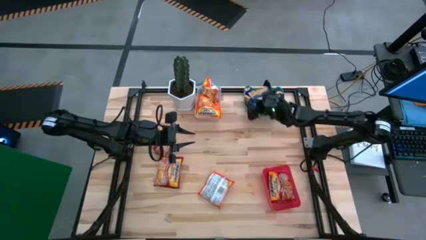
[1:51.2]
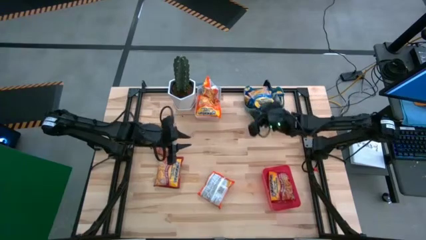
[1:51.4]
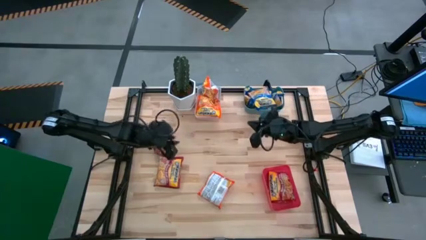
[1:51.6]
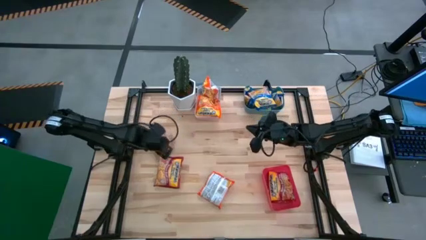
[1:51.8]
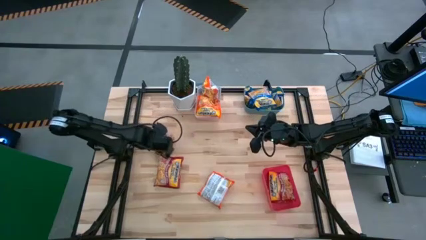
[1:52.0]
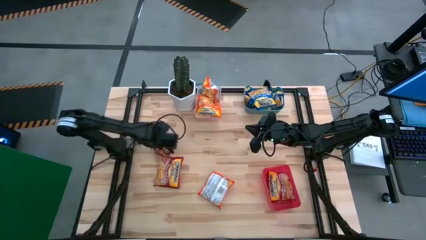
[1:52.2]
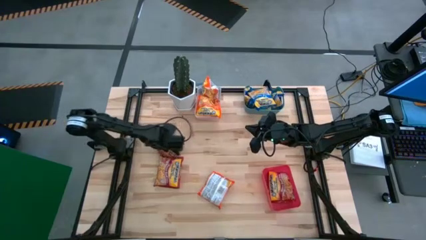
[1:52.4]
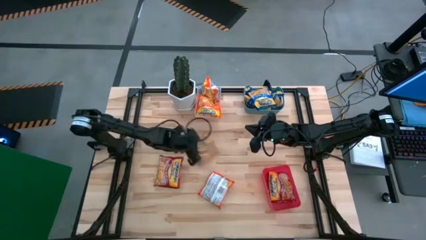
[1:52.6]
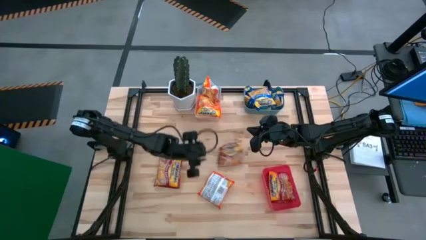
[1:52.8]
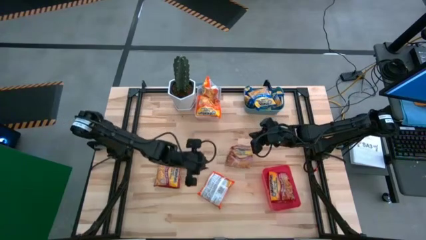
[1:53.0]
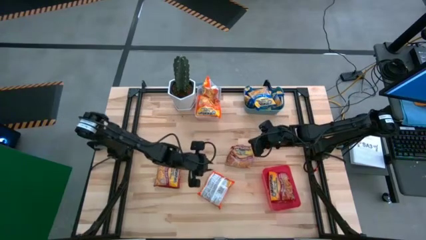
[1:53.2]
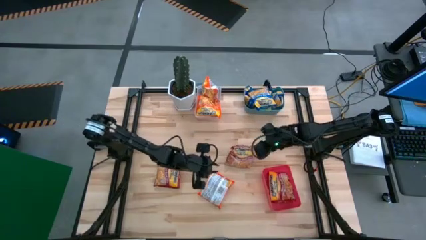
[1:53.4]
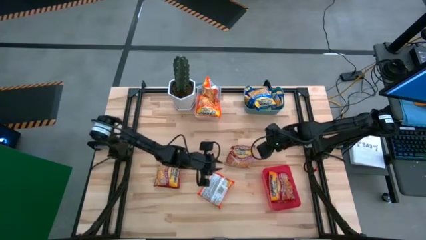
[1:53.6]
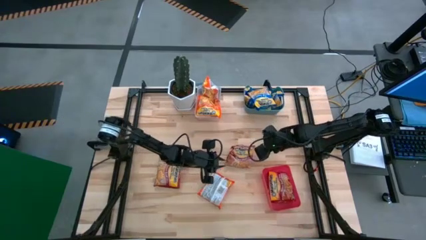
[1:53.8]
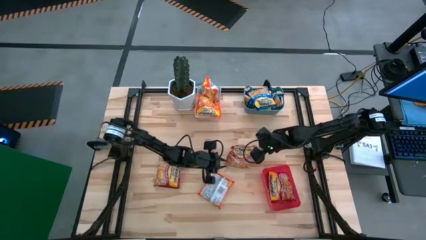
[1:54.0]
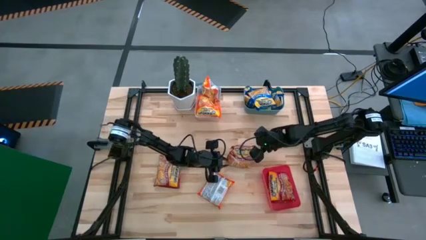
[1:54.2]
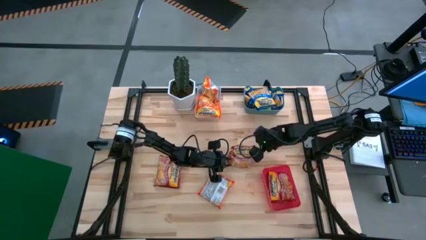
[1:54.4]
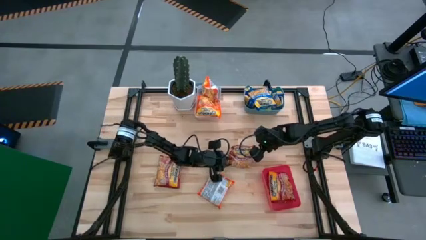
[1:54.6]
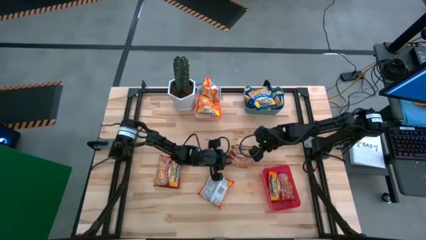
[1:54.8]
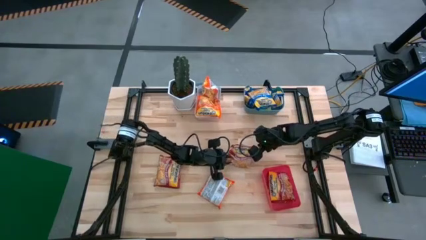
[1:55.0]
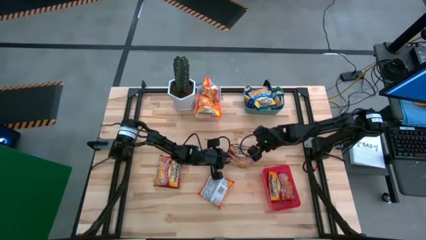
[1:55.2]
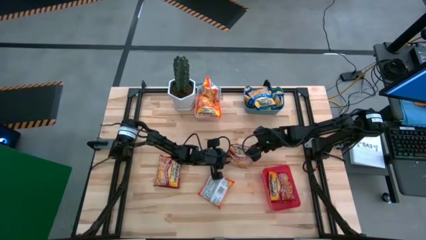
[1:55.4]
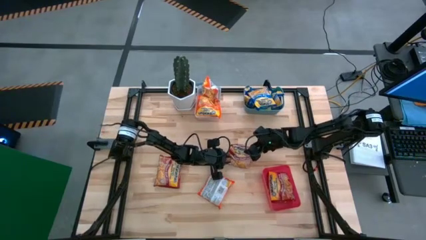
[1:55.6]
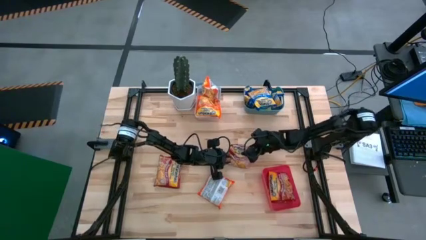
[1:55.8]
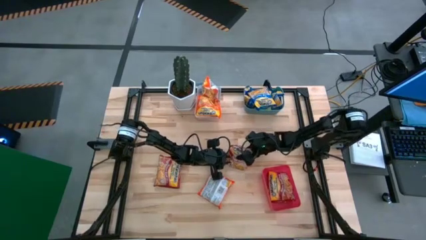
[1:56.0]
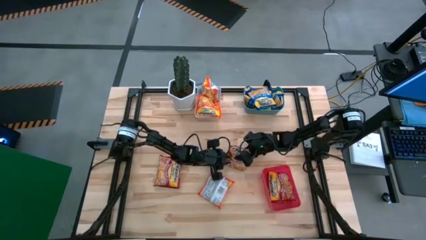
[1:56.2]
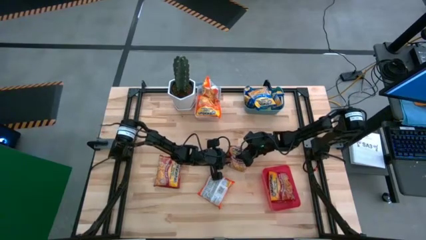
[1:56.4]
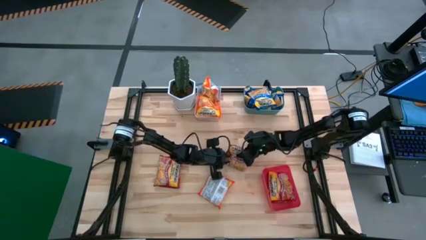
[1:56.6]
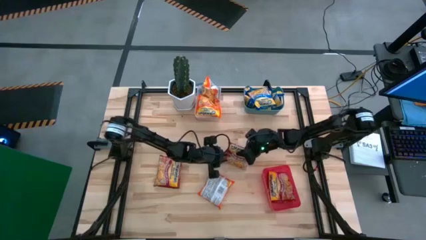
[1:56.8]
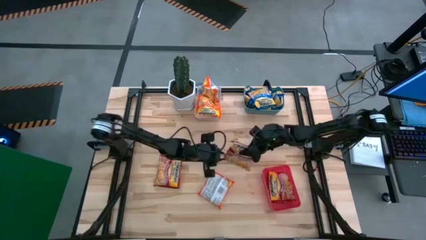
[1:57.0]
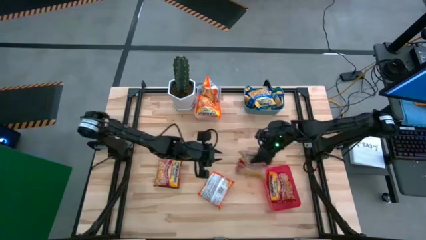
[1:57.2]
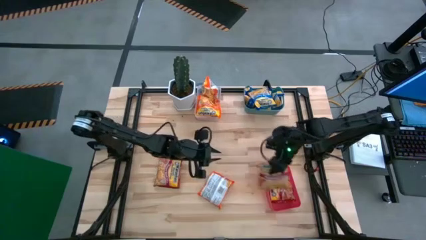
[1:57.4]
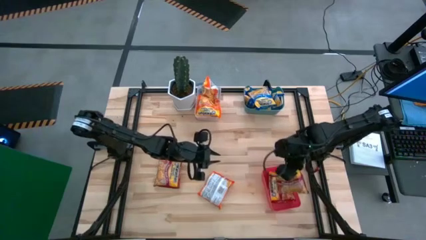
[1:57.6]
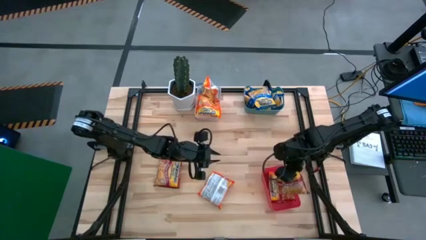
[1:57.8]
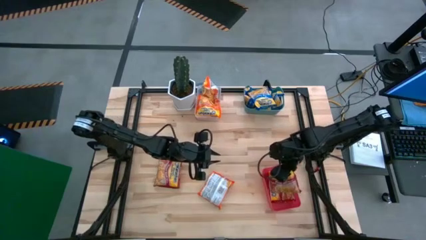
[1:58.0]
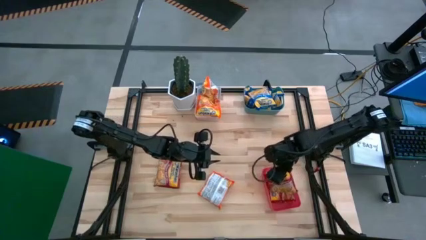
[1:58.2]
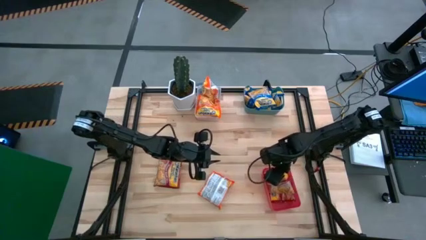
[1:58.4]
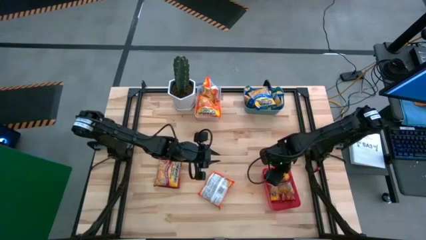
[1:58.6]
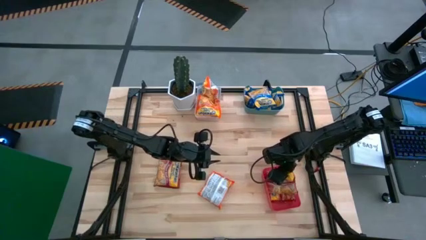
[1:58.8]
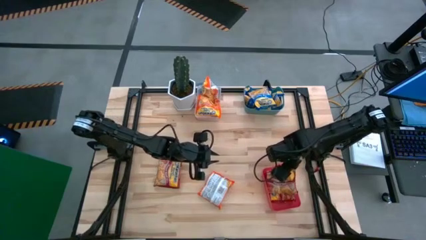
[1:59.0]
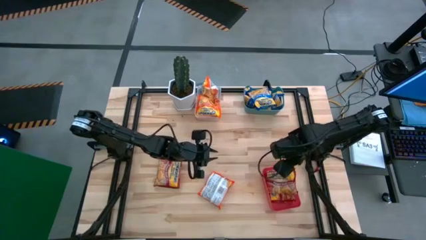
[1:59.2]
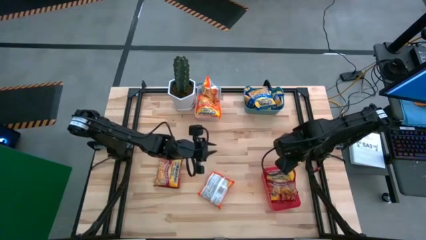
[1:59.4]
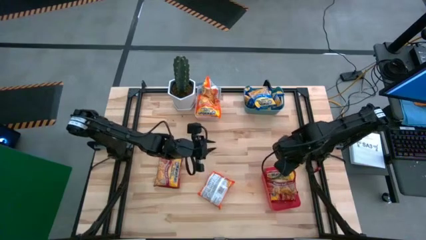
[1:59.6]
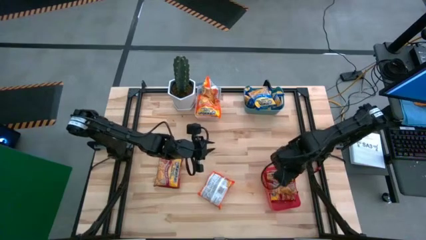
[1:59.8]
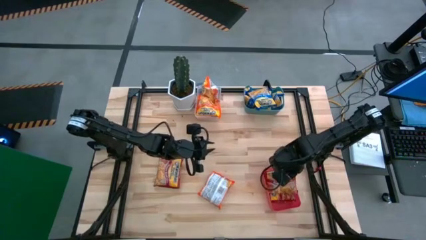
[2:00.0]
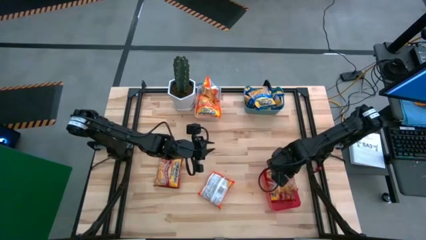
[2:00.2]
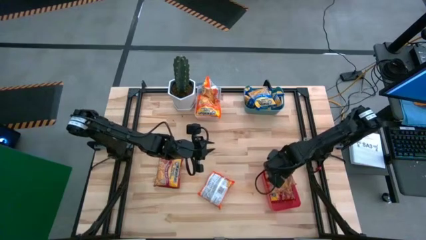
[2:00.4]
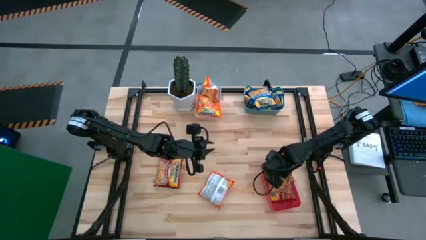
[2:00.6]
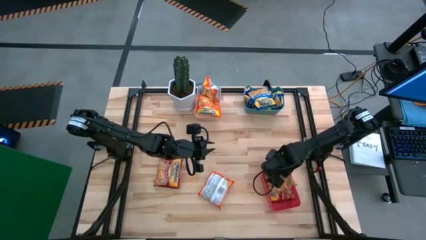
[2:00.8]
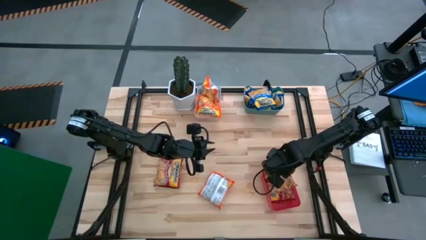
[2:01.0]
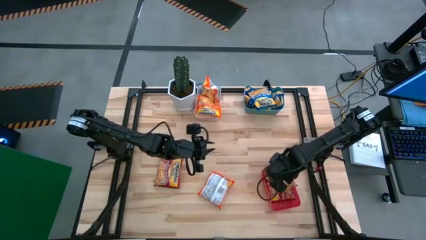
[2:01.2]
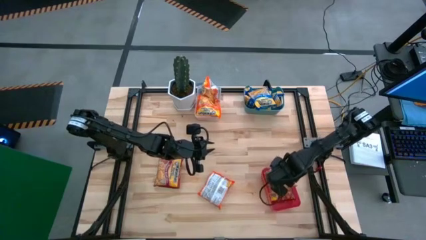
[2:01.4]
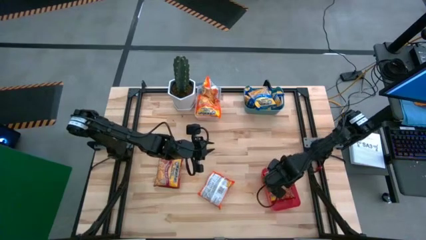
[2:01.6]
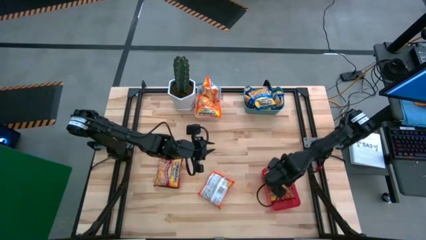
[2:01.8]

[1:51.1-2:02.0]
Task: Sort Maruchan noodles
Put the right red noodle pack into the red bin
